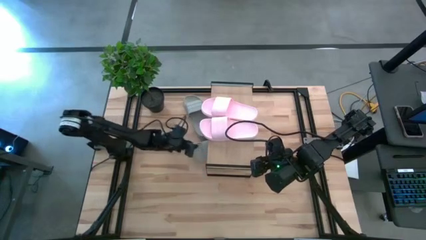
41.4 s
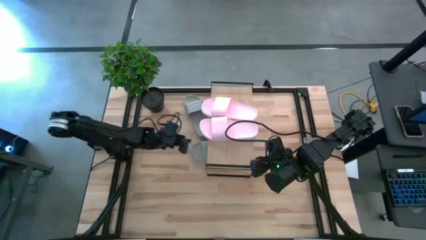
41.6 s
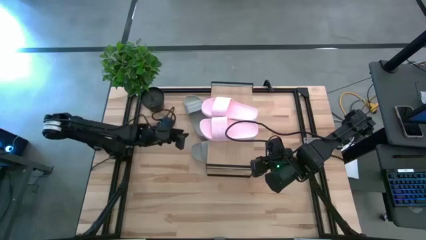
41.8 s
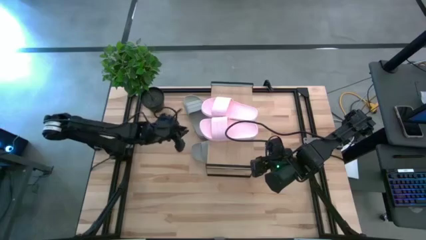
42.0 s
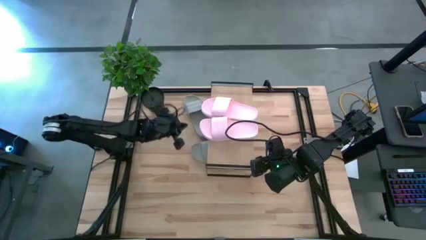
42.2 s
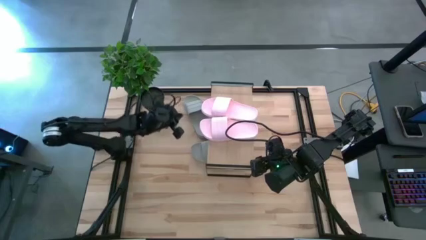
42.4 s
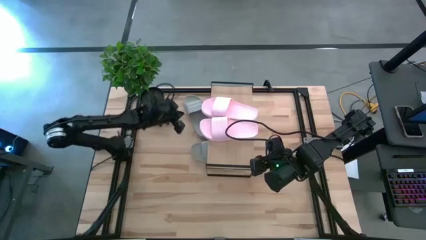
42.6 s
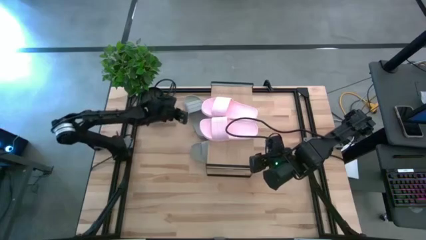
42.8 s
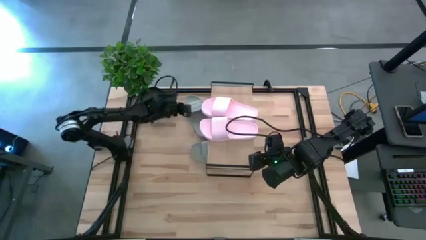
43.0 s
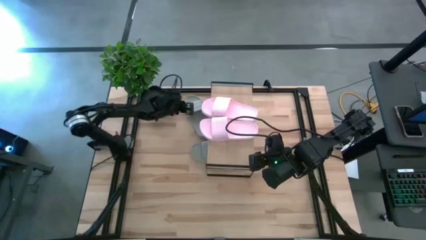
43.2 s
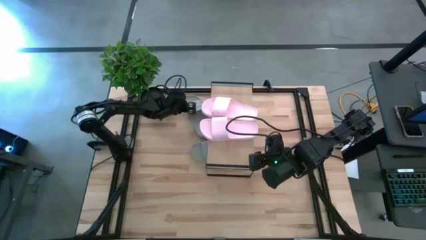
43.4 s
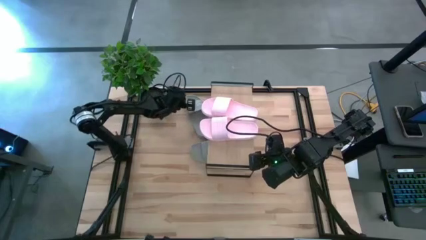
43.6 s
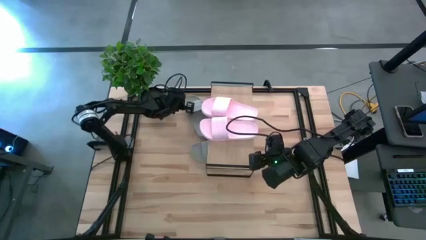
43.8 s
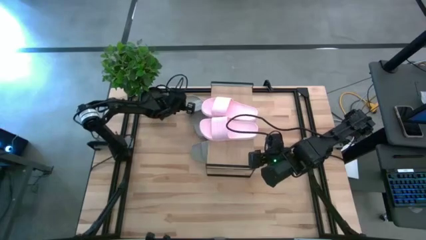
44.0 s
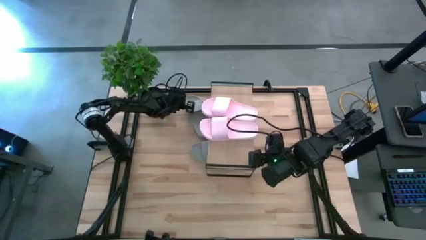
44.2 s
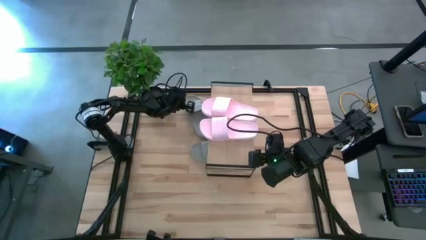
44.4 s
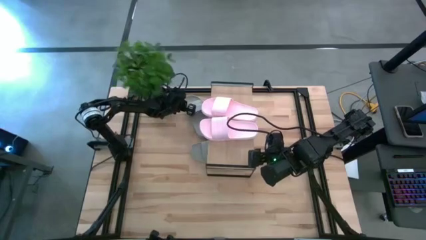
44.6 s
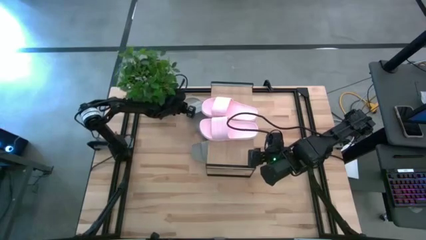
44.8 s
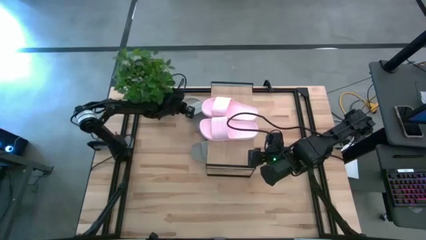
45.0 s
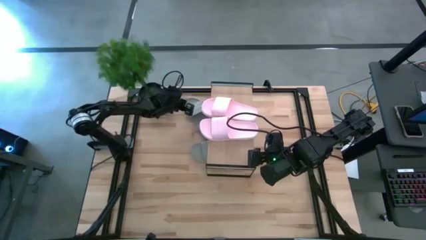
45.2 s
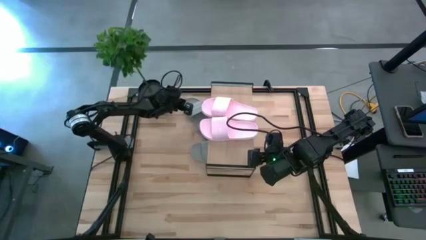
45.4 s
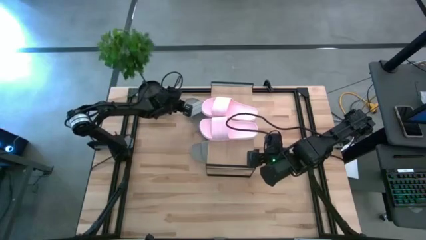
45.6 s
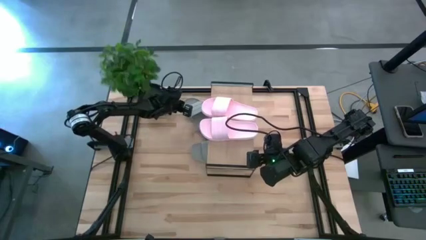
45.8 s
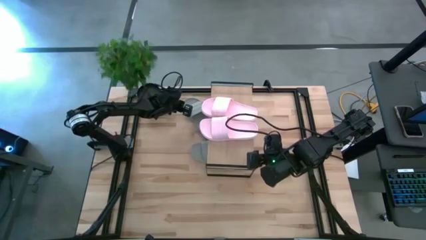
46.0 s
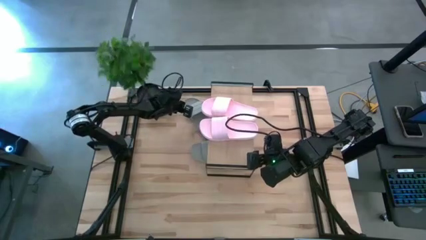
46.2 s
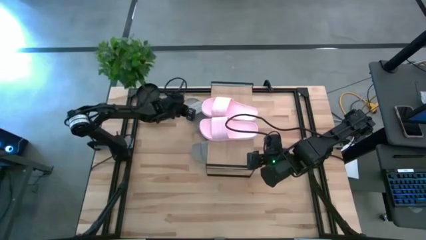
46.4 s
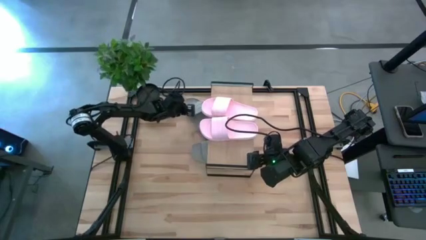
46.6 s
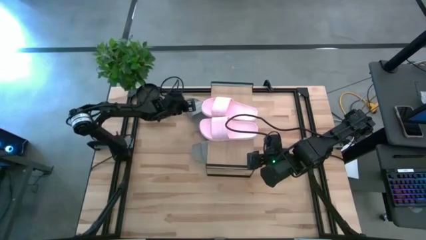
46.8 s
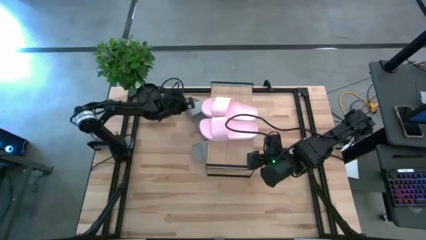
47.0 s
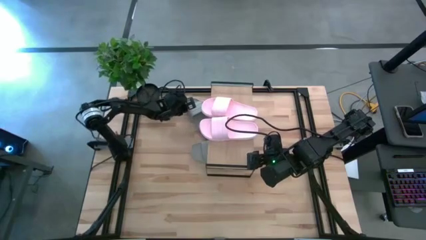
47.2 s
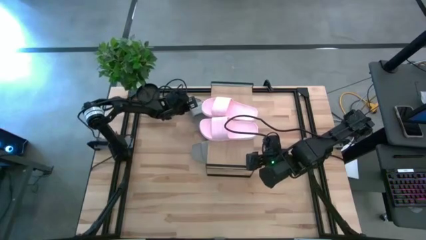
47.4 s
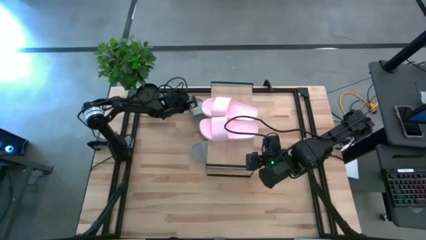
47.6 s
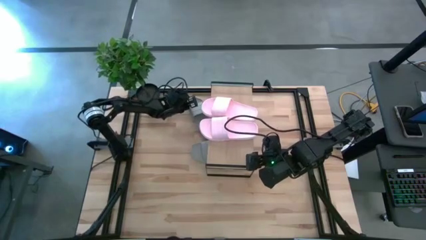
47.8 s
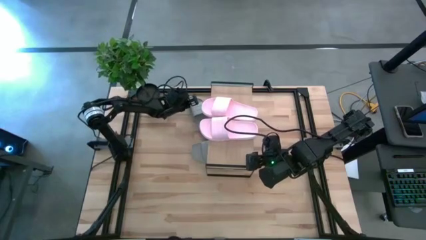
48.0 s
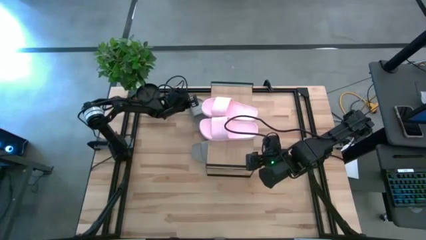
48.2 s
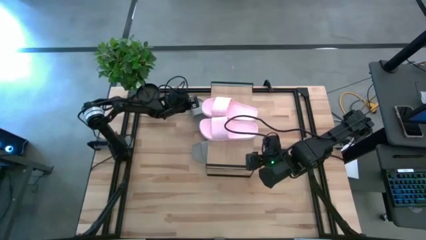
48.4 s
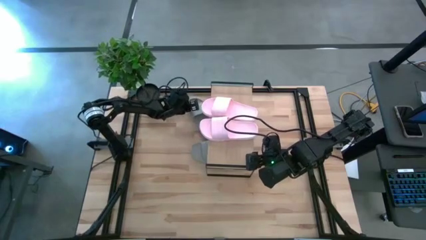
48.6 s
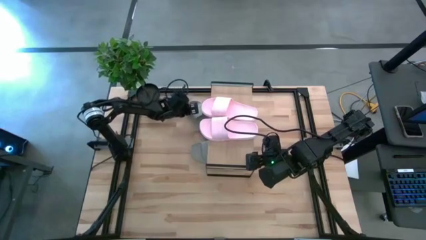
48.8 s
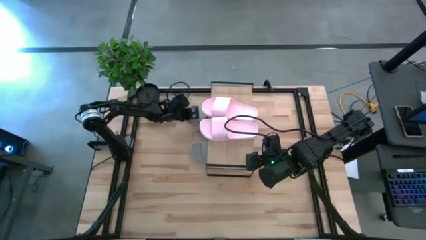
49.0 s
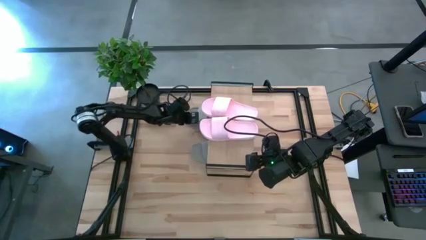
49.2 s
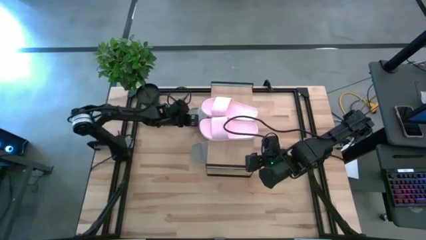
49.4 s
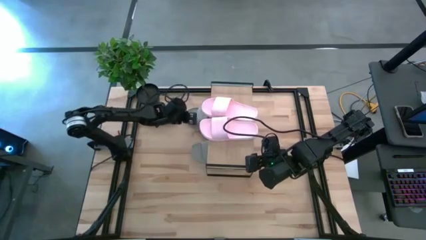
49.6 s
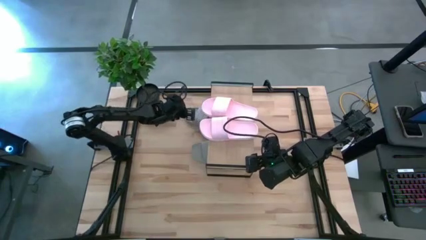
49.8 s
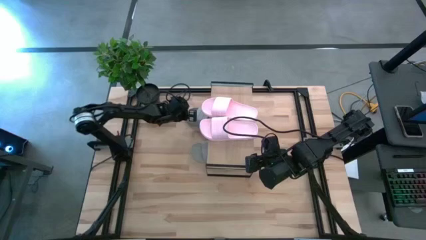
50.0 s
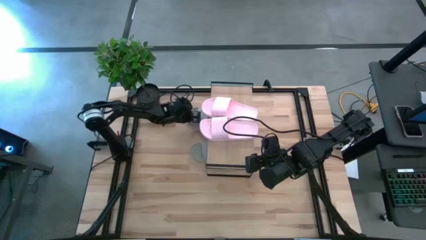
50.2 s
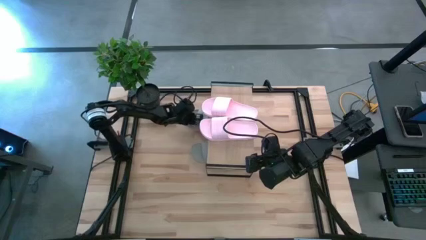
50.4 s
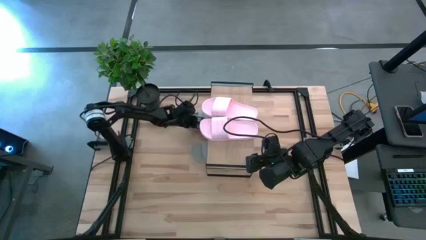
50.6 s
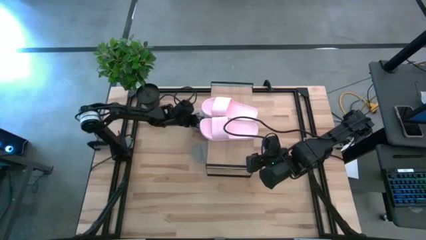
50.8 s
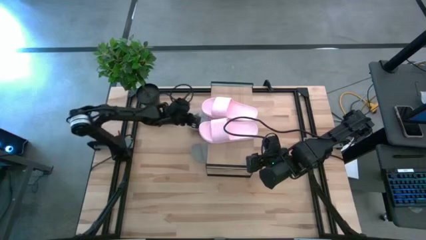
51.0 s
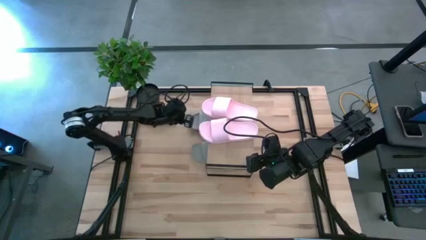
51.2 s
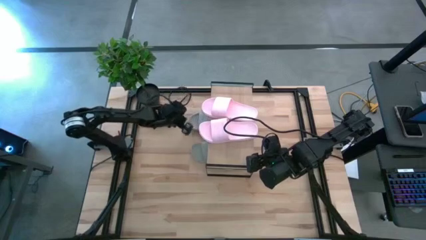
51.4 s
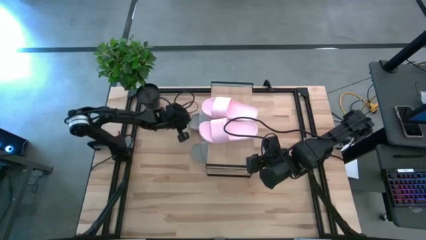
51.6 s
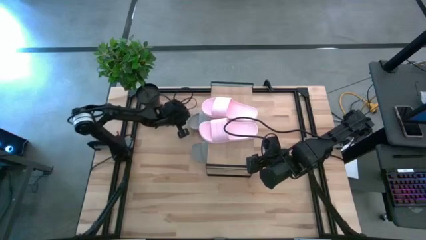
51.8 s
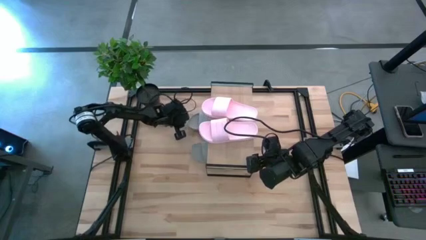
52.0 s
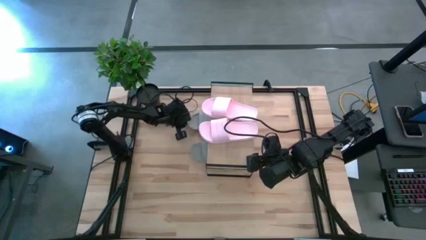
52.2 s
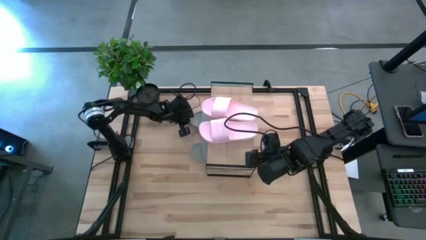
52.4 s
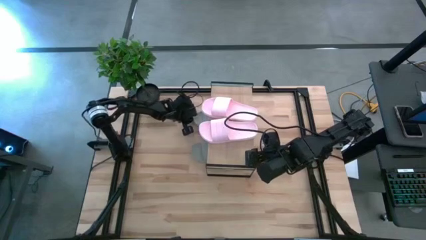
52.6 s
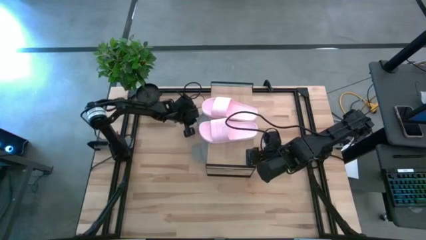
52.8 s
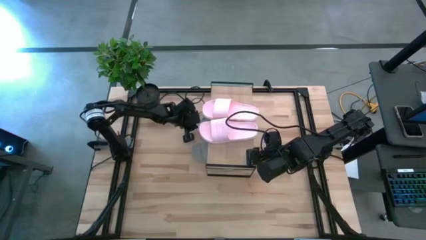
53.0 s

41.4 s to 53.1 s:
Task: Pick and place slides into the shelf
Move the grey slide under the shelf
